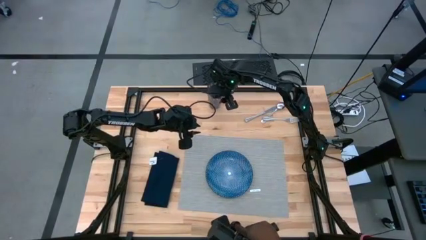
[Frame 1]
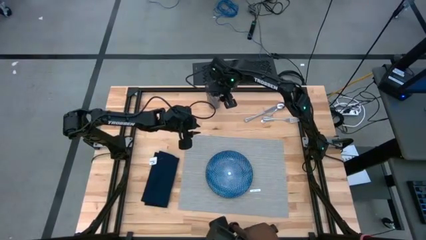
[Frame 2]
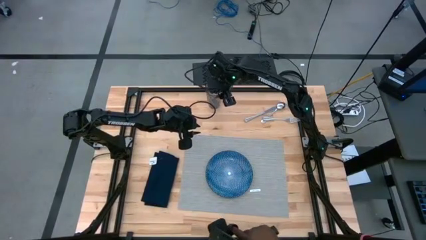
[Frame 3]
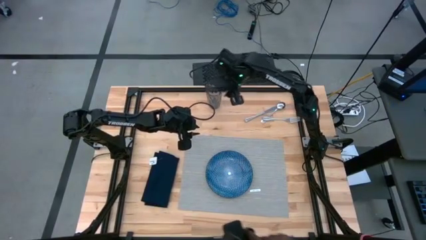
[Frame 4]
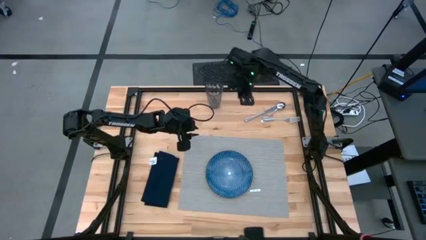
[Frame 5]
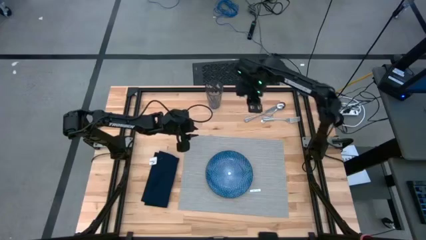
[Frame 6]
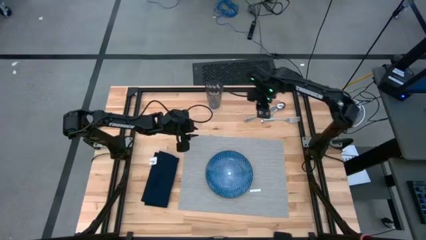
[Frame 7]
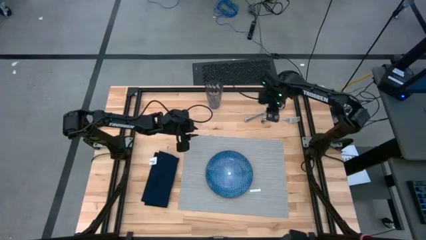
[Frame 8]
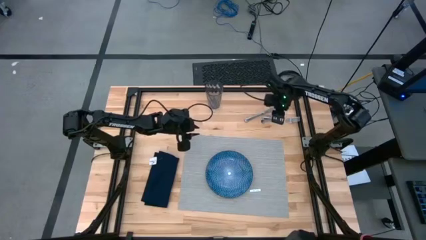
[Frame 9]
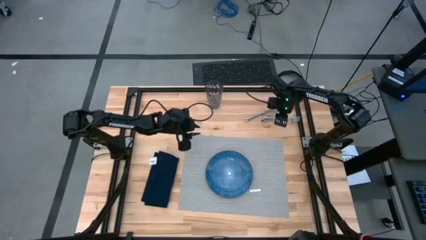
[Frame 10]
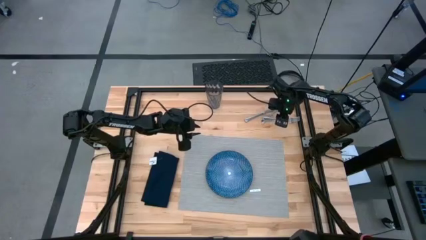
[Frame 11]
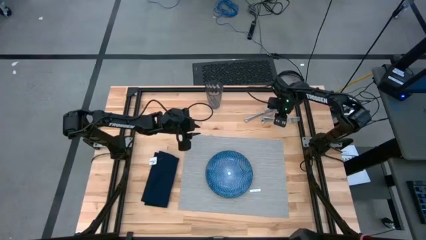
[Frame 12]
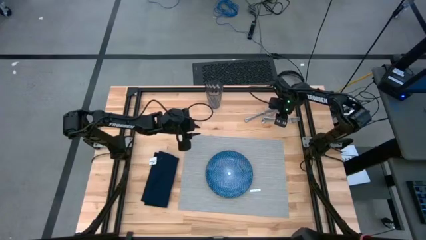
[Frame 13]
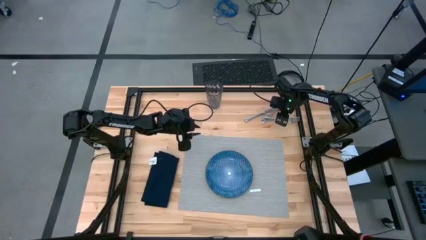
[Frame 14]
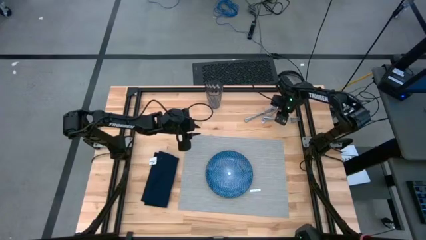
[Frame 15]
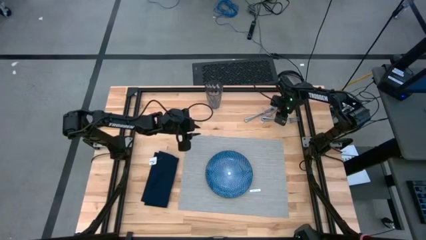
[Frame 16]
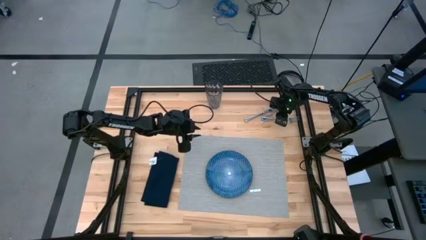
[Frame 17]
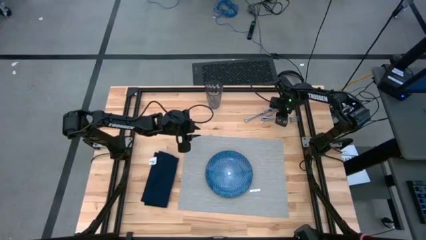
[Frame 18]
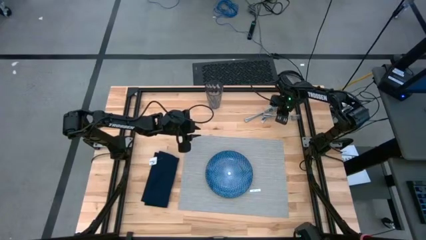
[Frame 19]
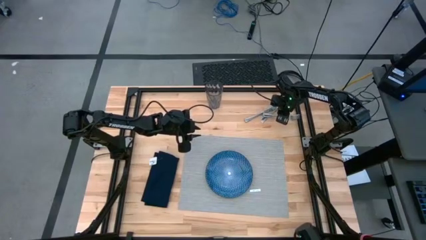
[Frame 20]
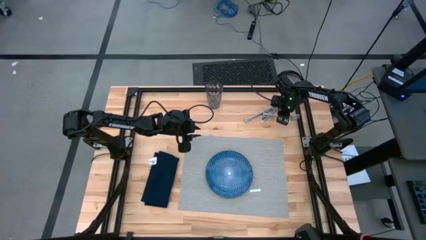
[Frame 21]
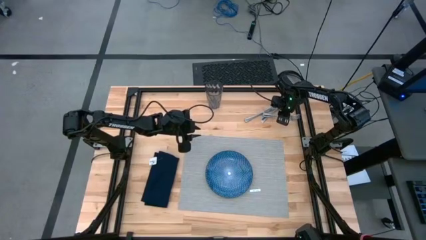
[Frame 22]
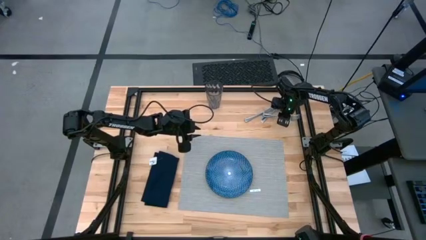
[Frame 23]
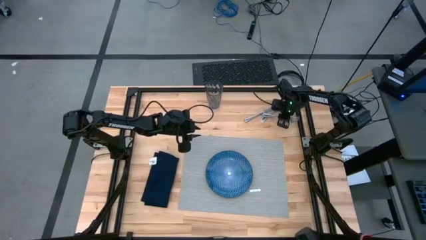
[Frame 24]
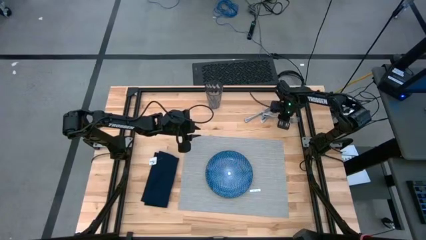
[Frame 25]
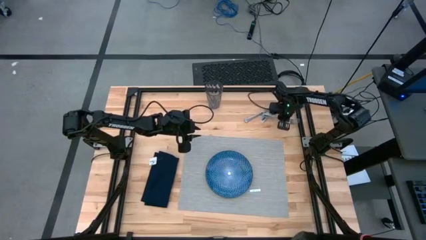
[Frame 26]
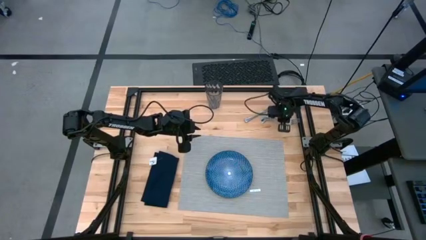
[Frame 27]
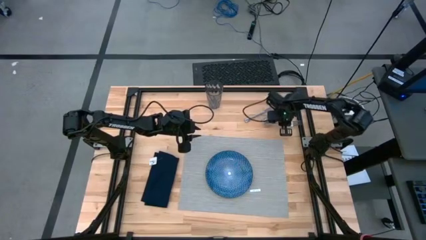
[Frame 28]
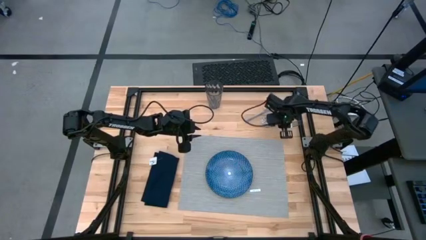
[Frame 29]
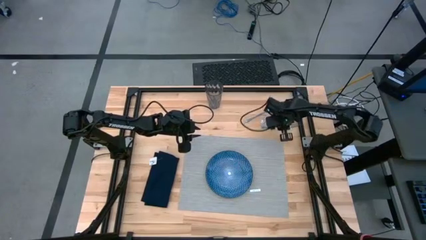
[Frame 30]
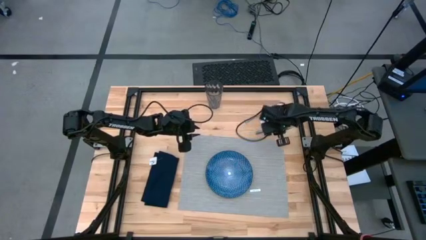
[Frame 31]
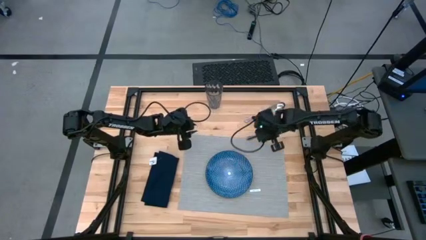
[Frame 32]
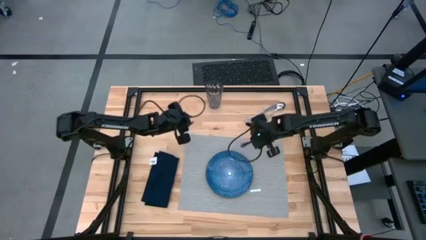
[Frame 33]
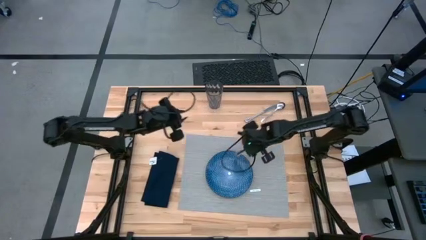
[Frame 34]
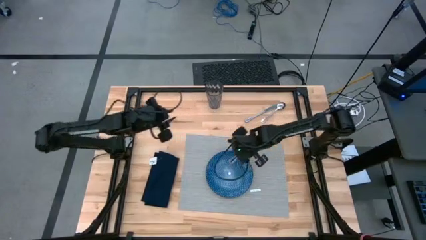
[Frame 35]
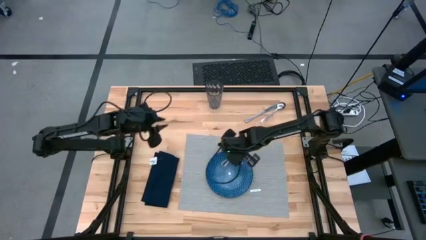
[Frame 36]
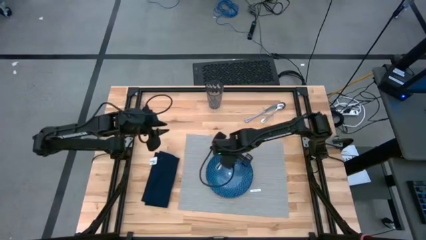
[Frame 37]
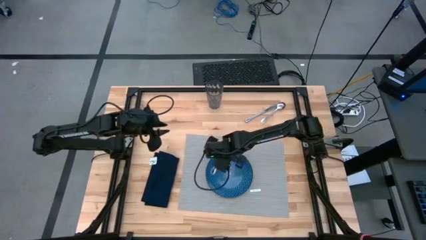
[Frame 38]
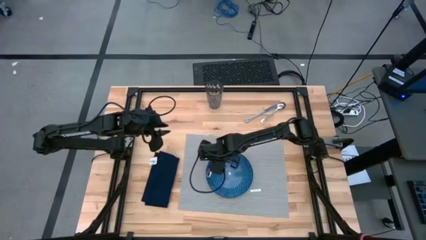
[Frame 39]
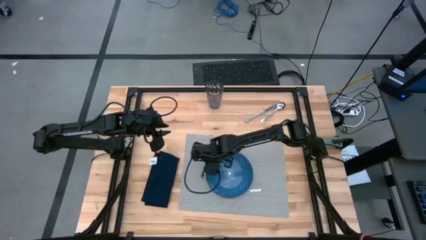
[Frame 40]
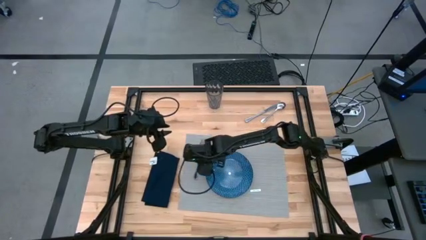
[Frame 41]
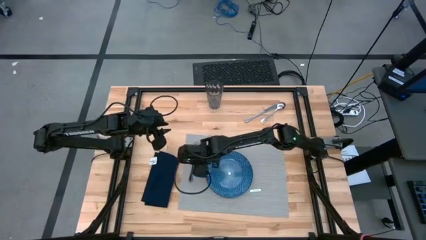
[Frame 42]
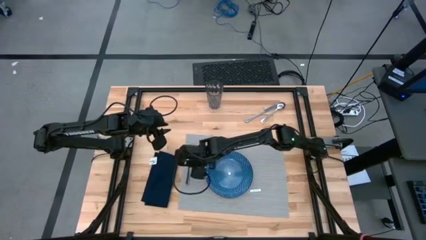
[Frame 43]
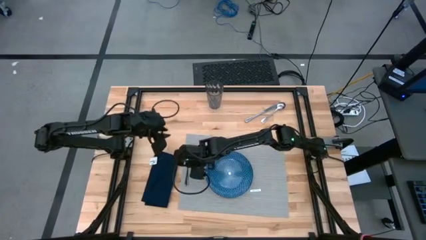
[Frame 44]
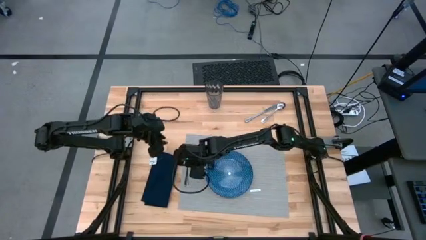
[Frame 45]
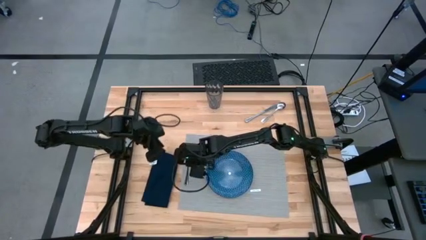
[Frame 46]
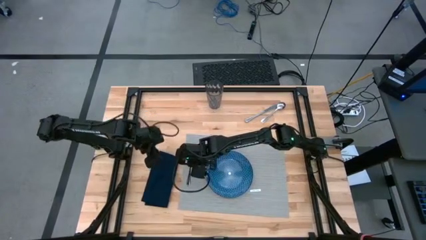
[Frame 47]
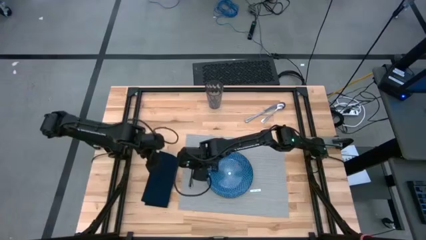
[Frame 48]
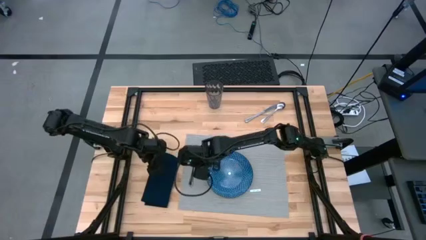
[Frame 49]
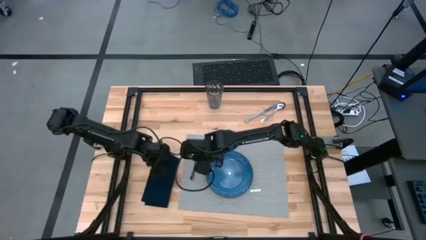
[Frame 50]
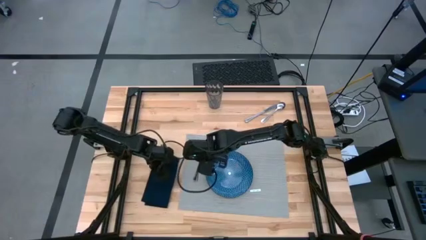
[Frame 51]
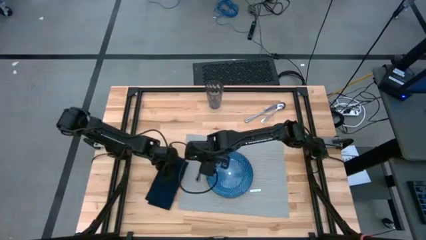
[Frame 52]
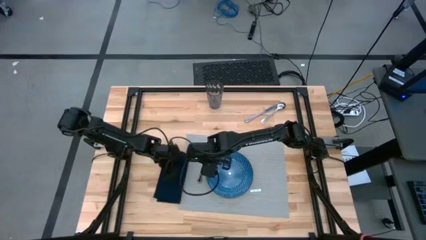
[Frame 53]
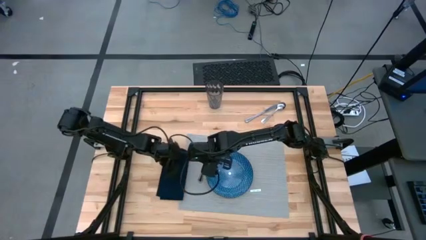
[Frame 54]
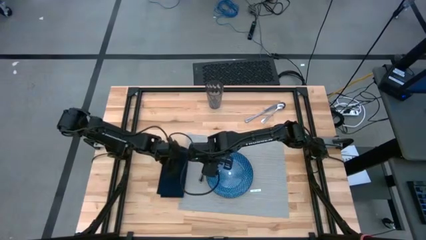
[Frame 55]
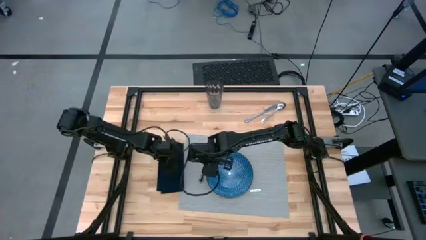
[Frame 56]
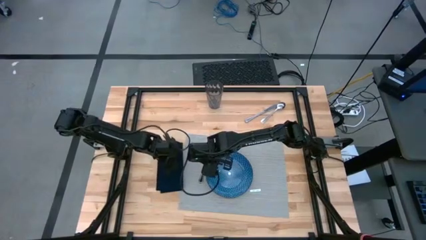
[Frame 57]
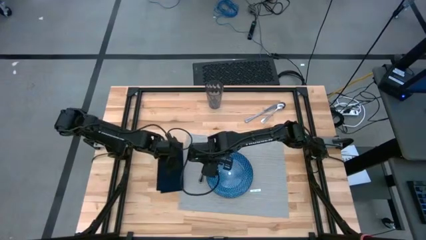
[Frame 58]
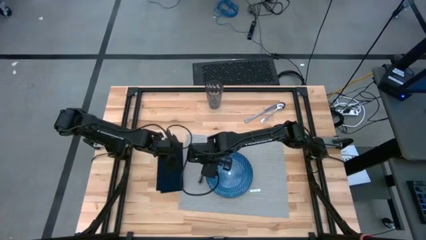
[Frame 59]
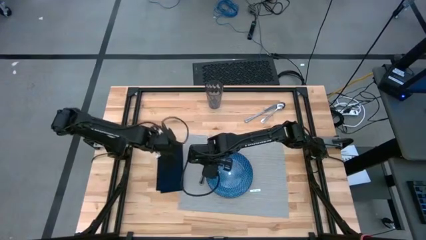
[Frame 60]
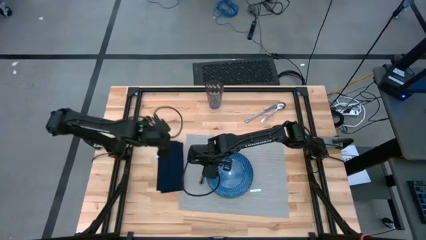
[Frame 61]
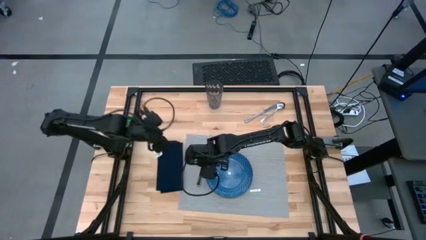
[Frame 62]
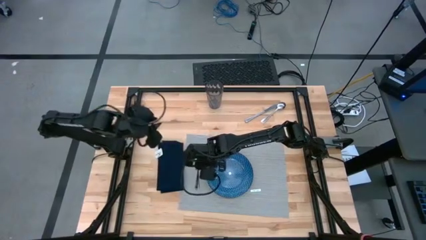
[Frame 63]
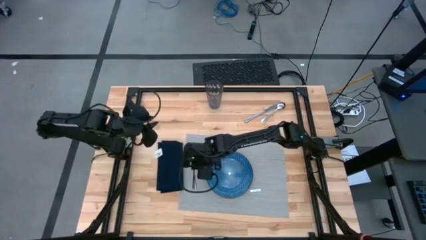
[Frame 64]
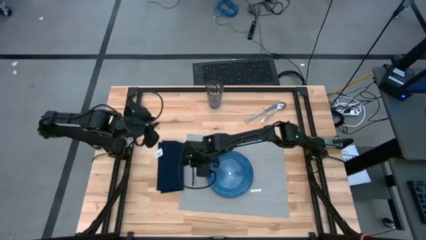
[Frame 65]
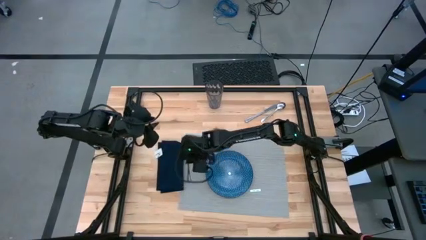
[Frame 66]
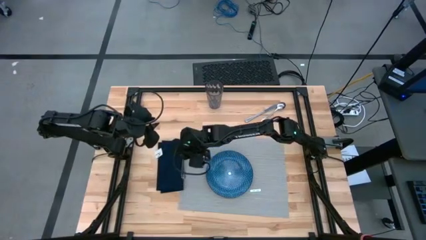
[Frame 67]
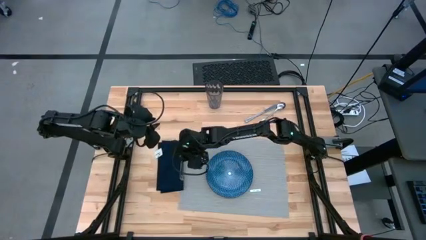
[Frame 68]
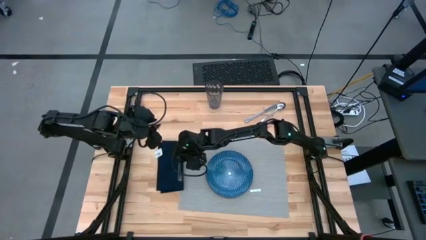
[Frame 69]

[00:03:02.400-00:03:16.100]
Task: Set table place
Put the silver fork on the blue napkin

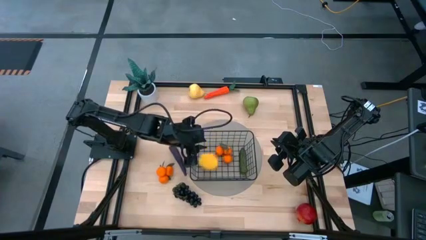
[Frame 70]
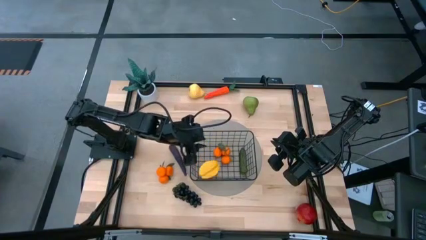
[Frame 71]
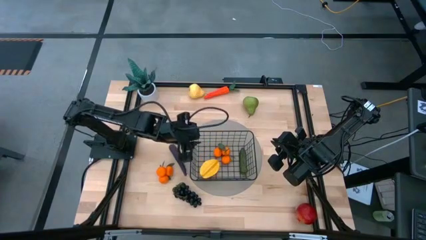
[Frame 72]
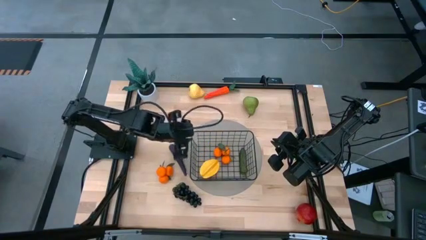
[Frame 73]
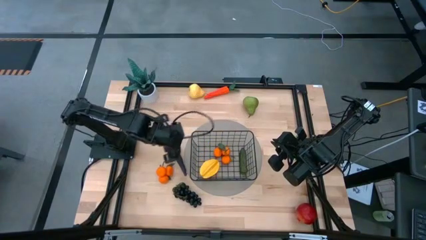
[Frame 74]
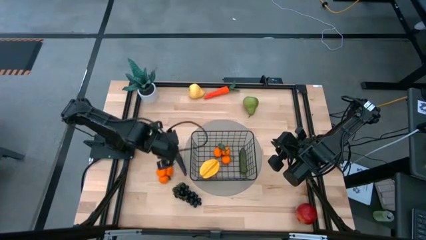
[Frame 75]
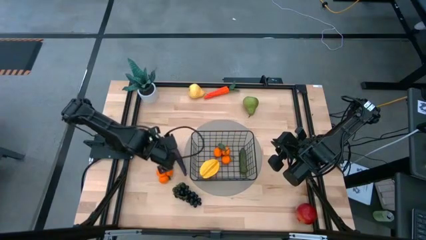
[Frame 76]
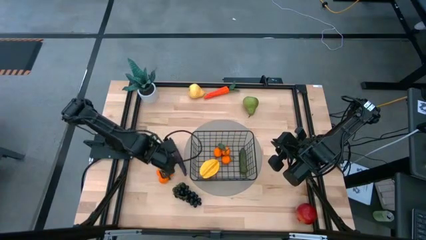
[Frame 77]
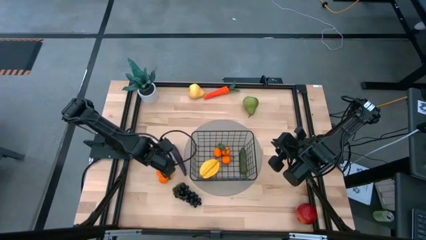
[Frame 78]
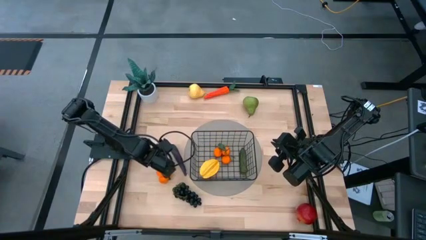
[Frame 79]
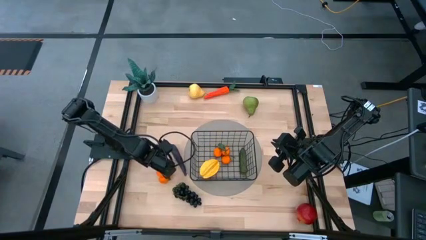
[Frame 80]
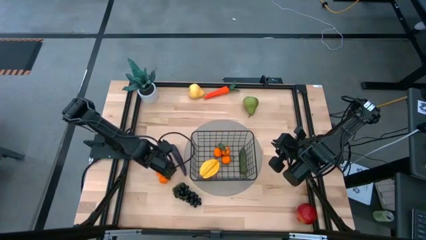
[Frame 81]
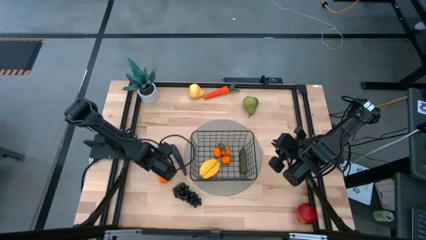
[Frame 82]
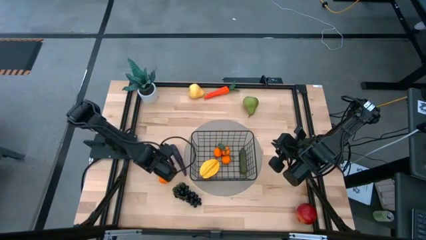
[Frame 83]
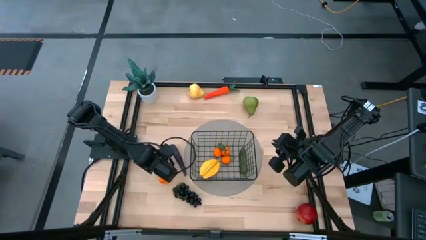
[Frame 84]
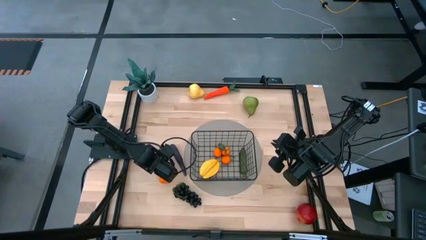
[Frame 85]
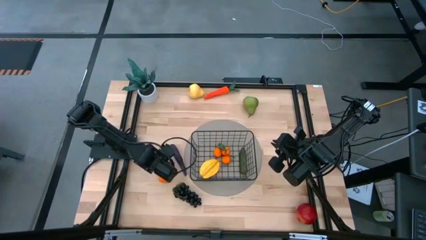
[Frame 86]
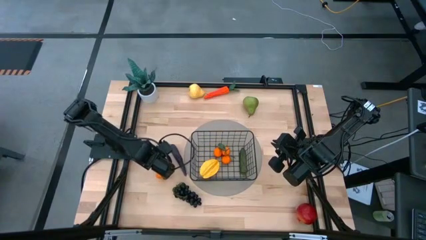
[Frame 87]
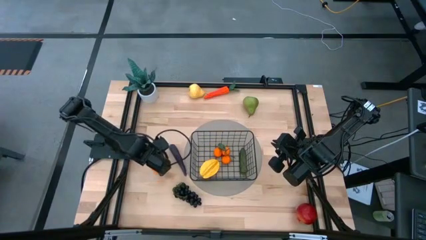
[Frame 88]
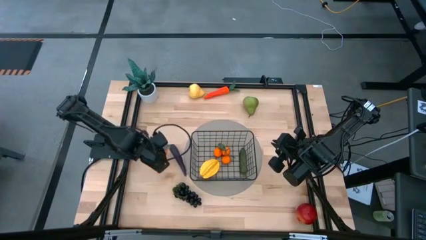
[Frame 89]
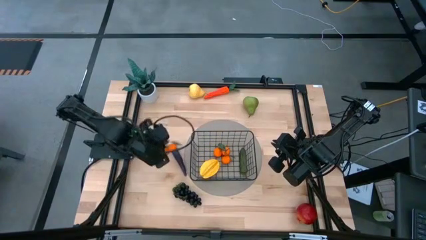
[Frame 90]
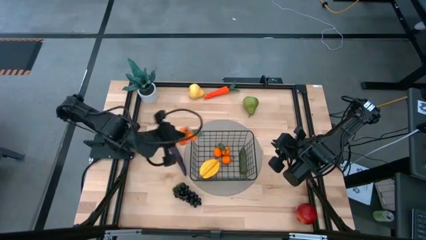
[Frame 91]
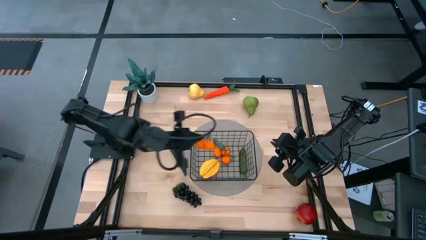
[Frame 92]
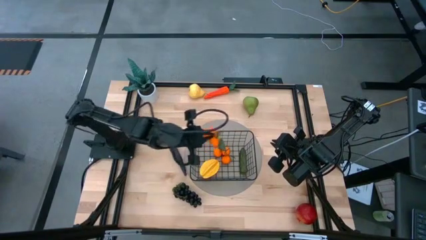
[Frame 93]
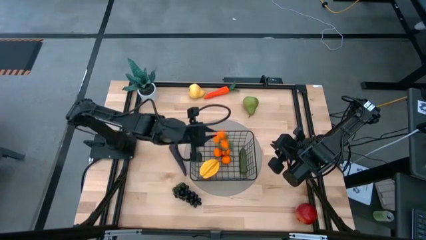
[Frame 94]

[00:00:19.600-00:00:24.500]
Task: Build produce basket
Put the orange tangerines into the black wire basket
